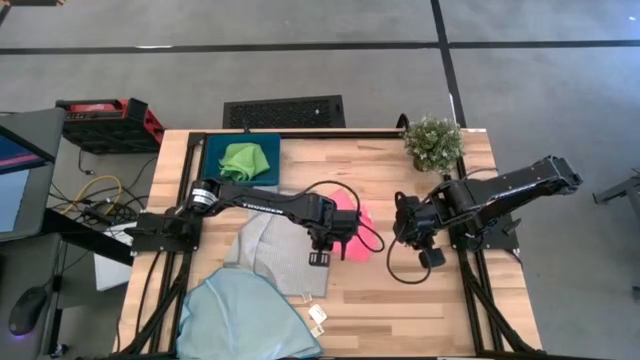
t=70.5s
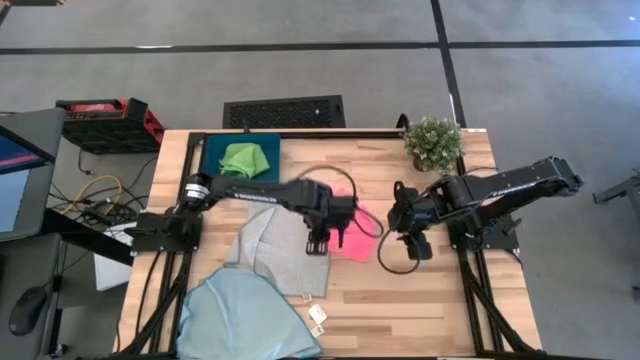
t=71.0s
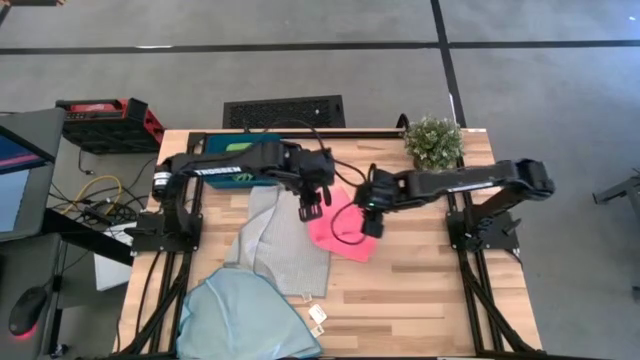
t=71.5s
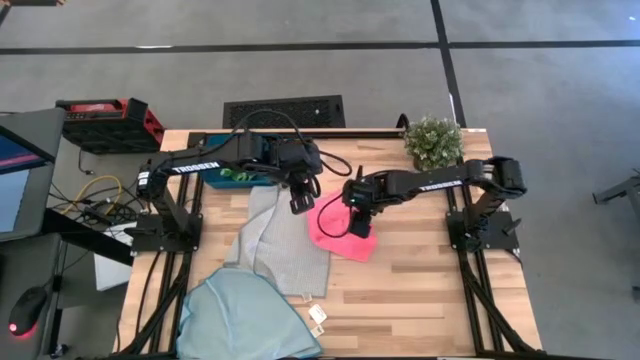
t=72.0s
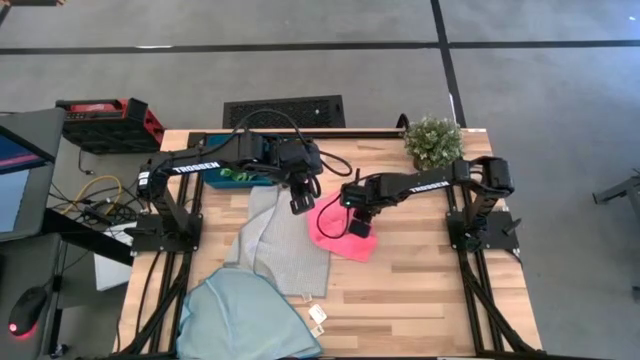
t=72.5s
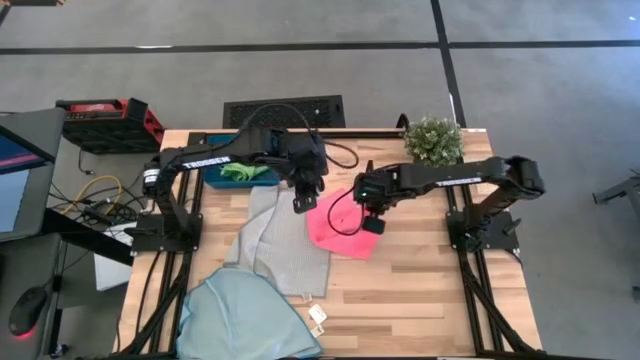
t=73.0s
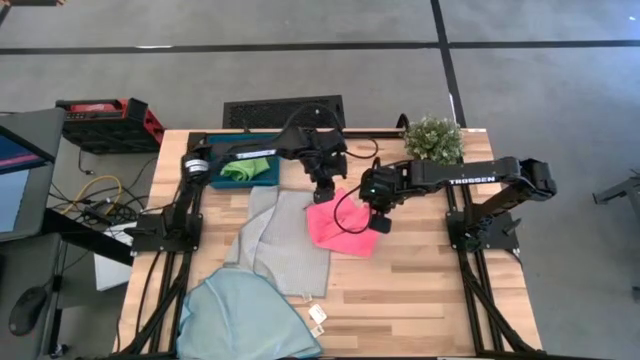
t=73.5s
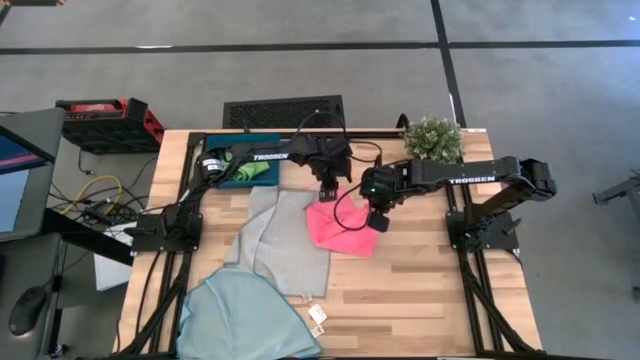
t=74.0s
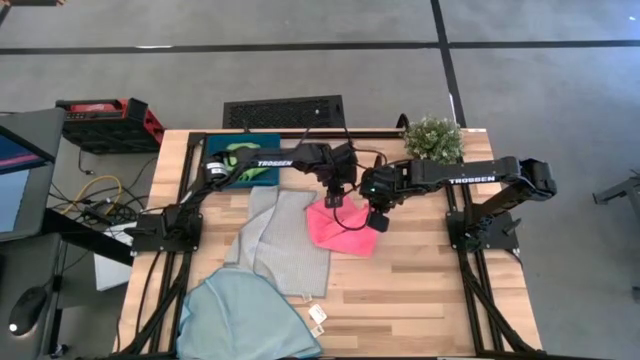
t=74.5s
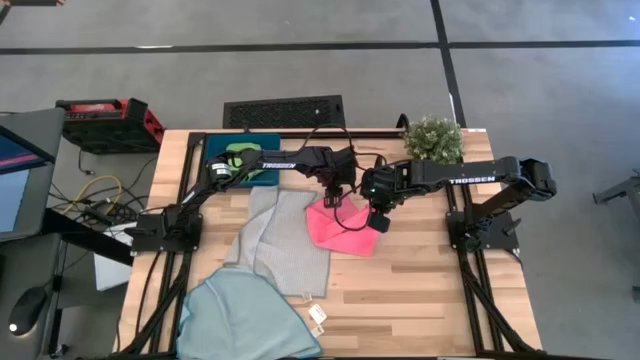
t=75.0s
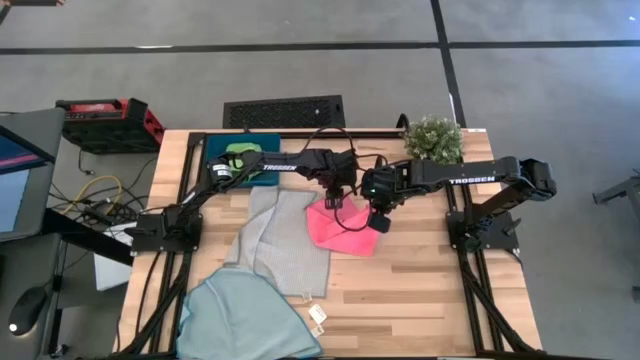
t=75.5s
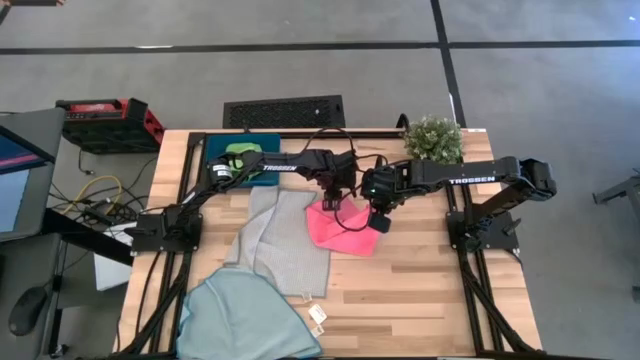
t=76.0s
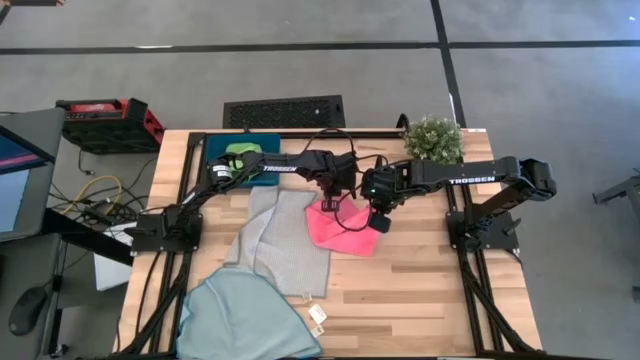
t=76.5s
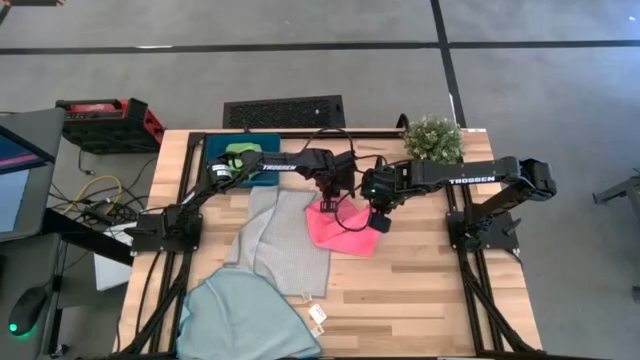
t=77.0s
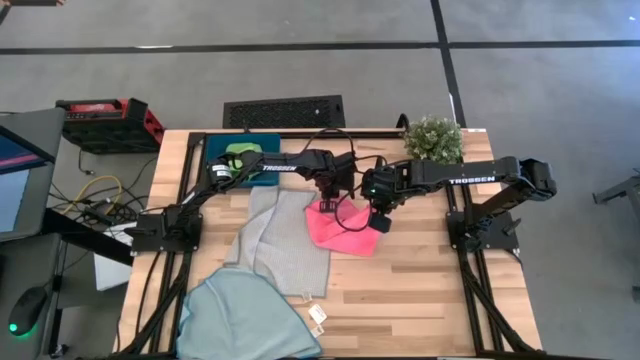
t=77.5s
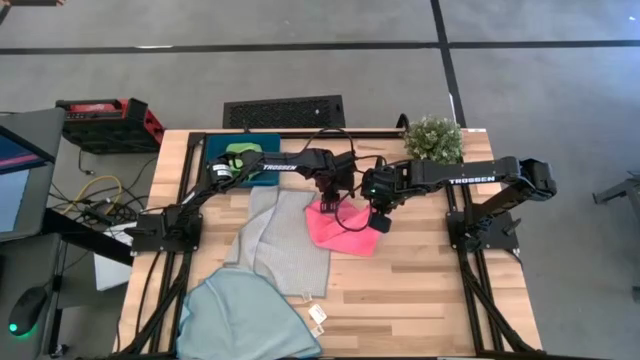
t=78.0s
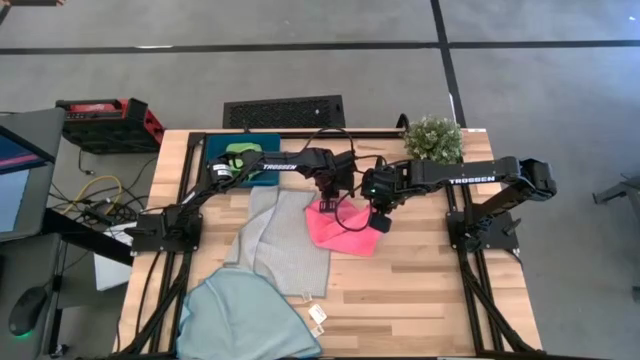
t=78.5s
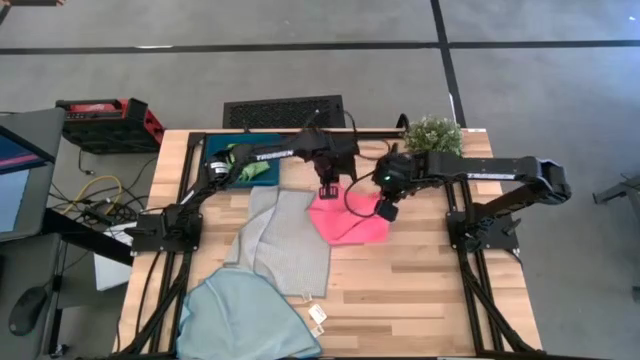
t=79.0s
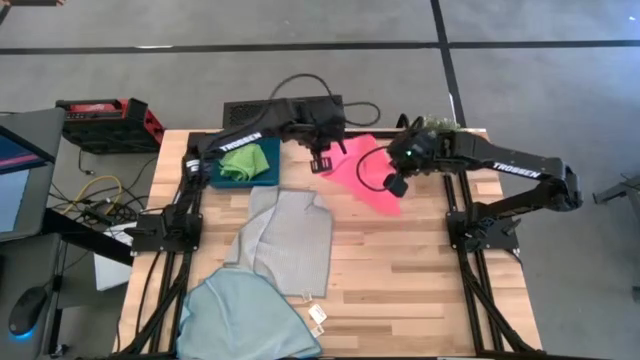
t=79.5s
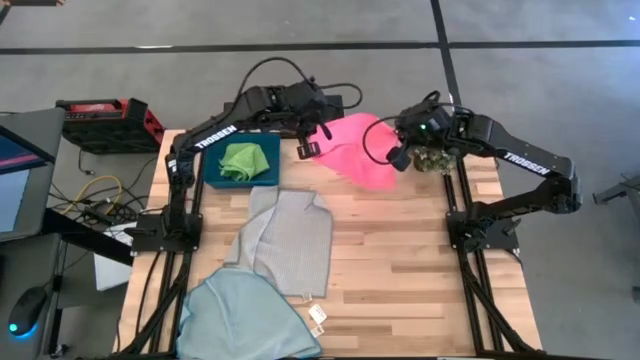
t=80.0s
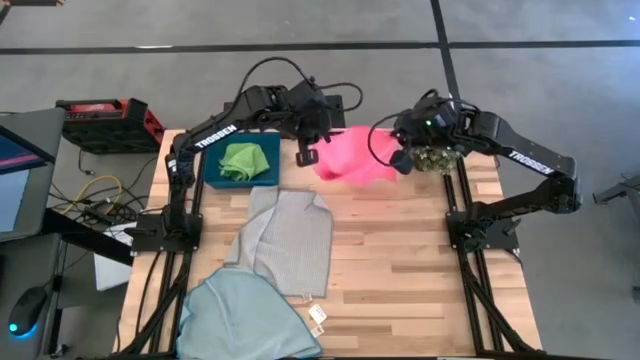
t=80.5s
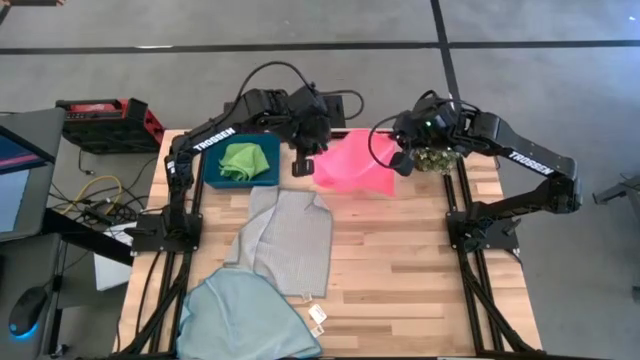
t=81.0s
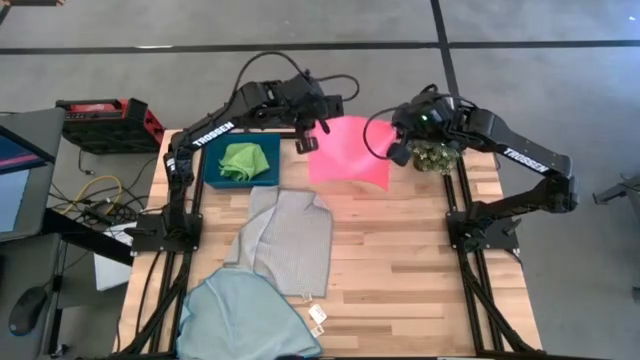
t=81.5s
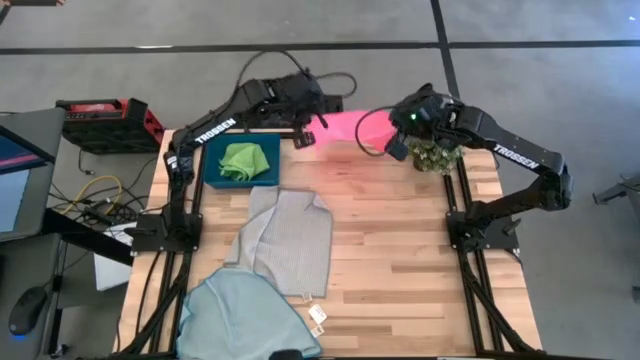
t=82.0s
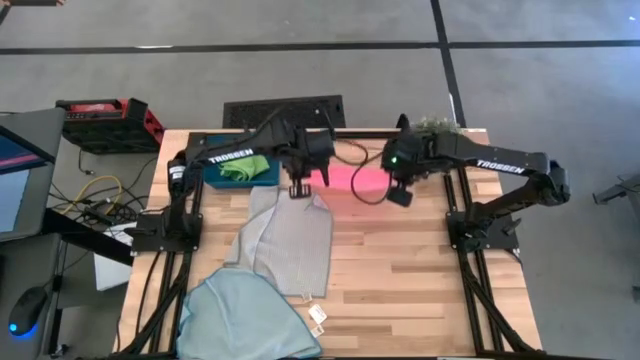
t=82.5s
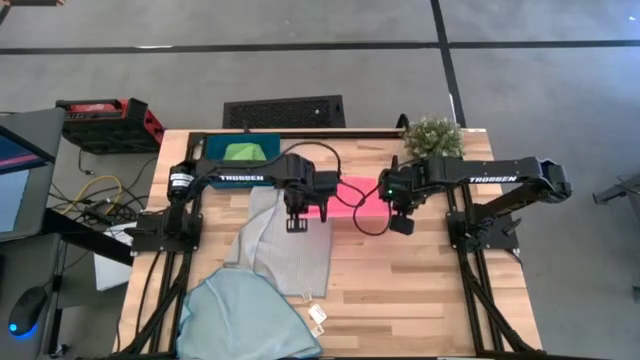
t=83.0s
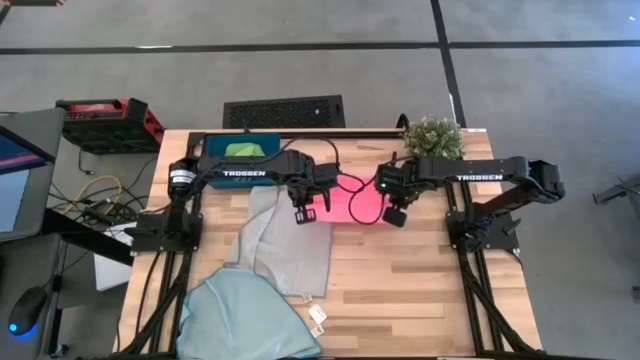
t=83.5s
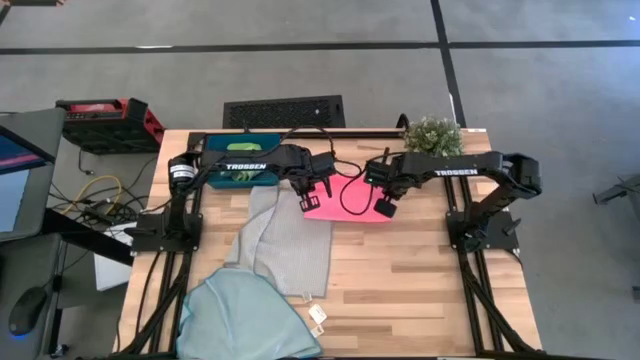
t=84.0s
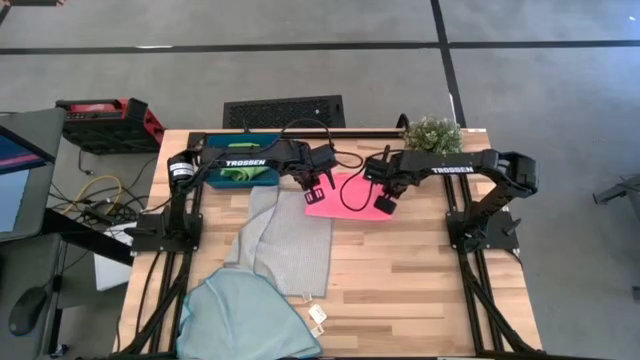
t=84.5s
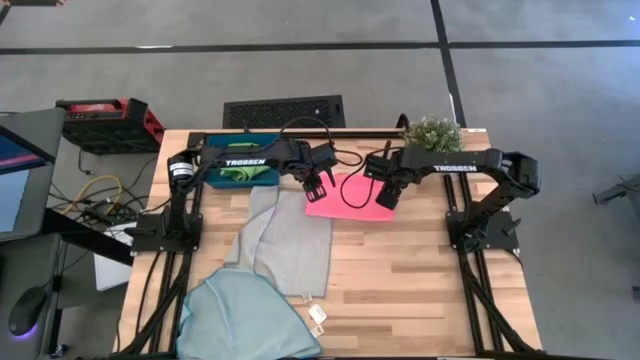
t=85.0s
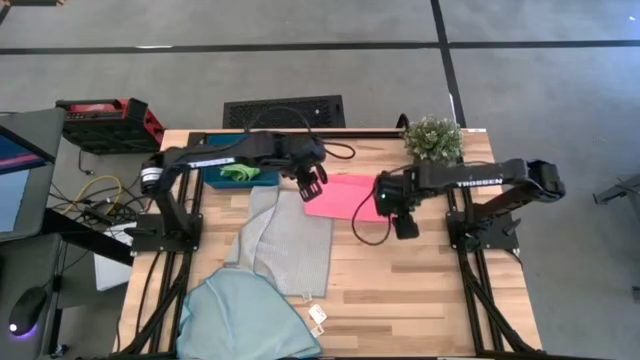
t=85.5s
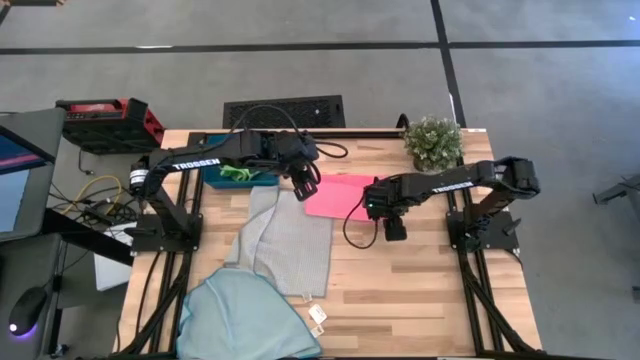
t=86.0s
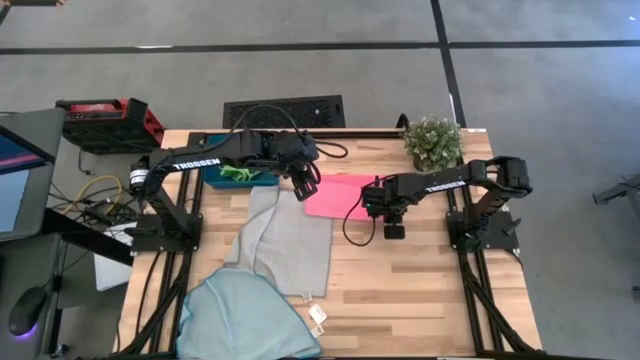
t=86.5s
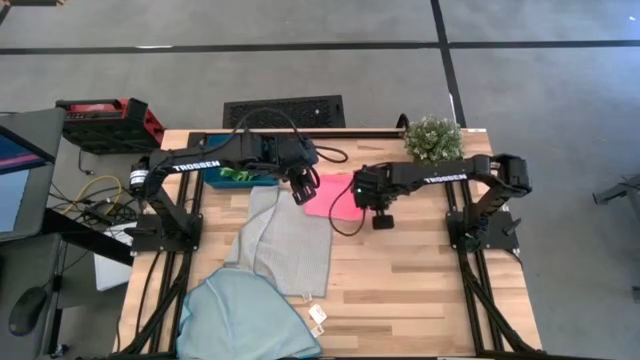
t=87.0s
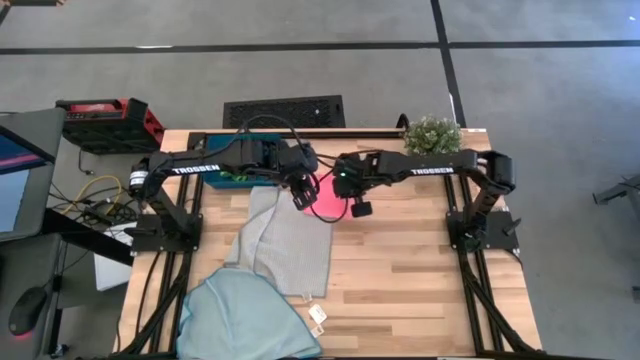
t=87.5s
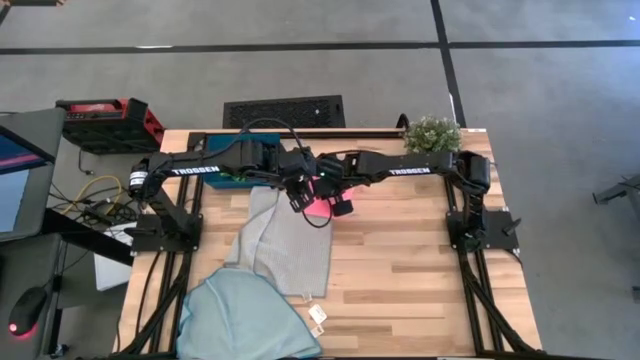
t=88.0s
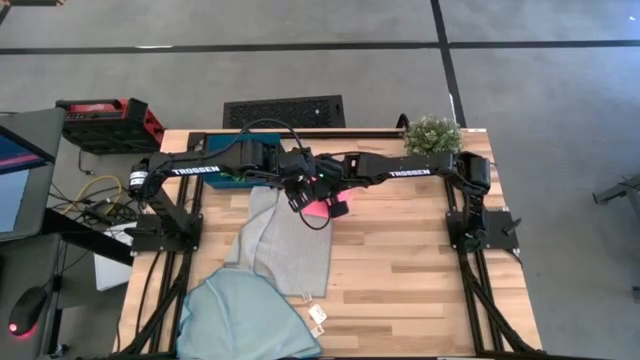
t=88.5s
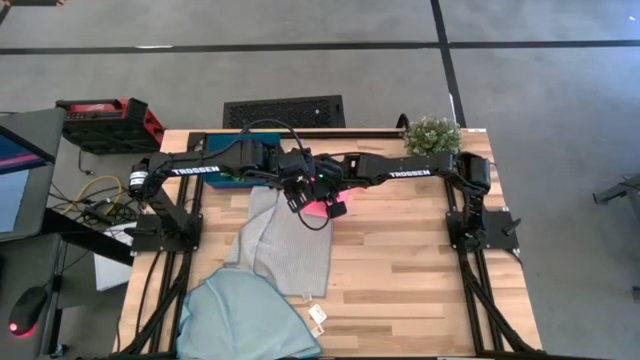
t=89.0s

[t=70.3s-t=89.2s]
Task: Fold microfiber towels
Fold the pink cloth

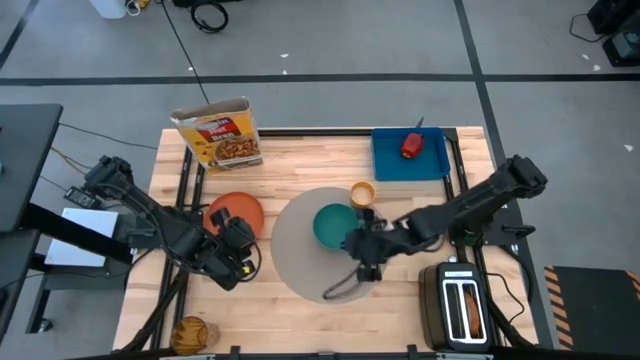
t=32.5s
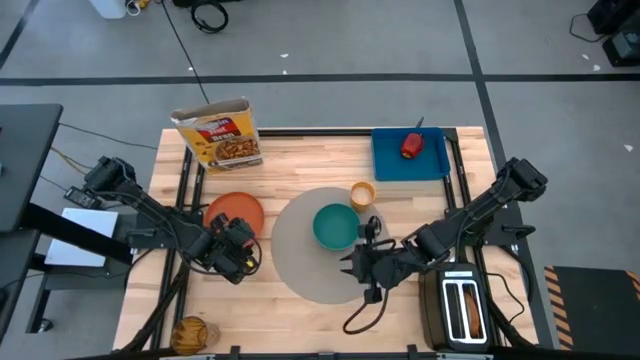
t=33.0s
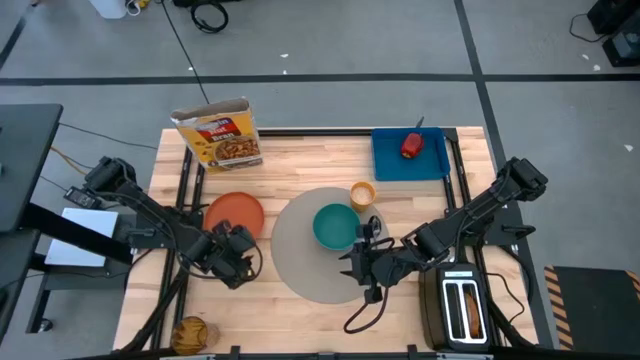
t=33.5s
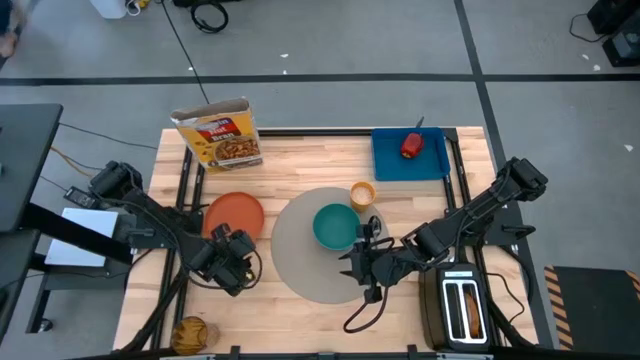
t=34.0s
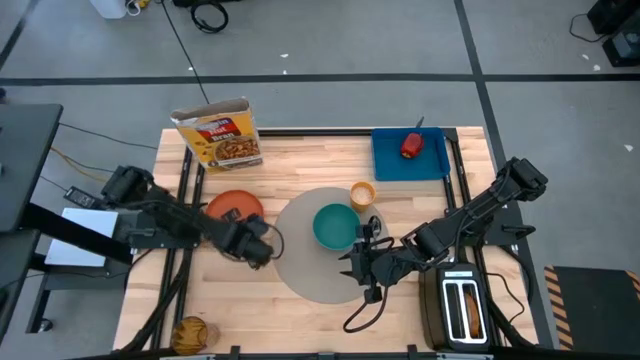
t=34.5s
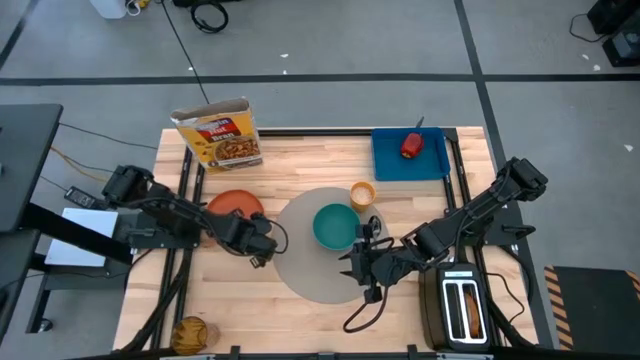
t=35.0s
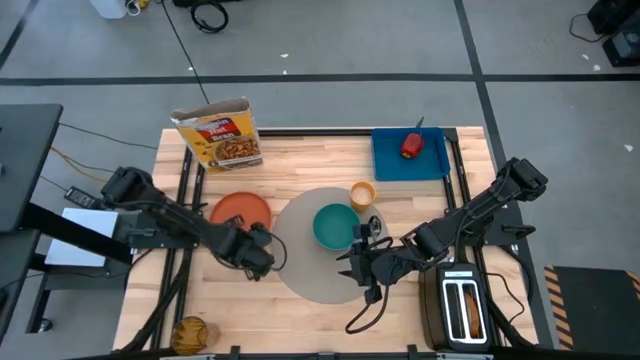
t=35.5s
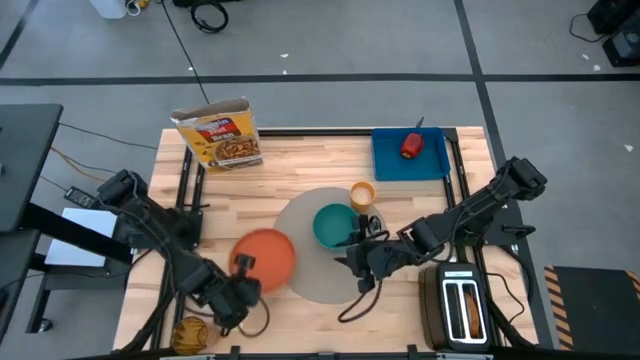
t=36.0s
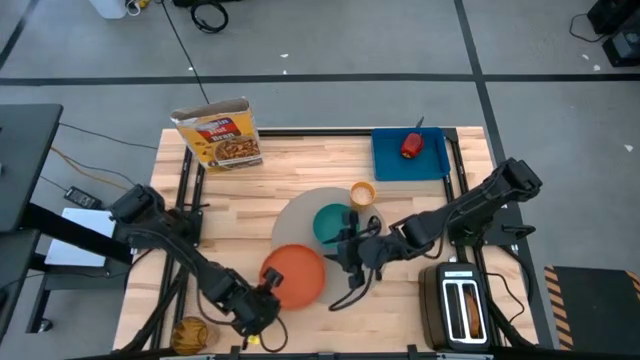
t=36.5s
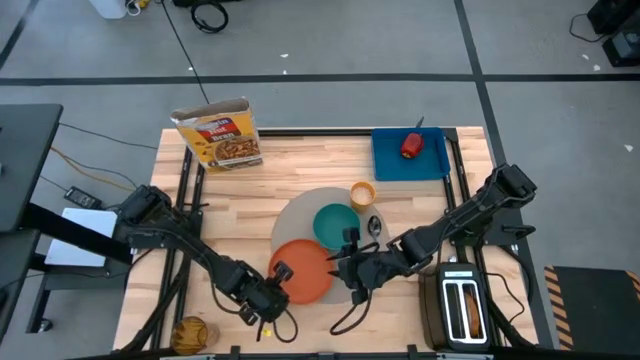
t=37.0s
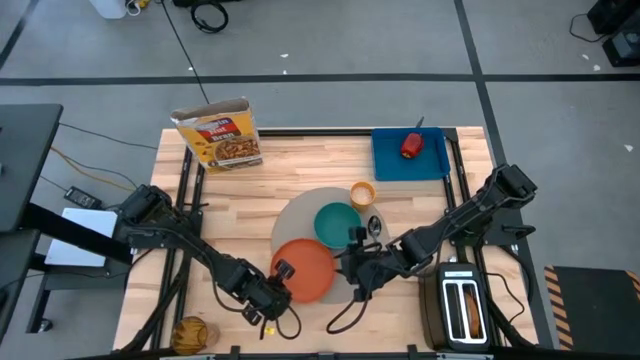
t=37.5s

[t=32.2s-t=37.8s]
Task: Arrange a breakfast setting
Put the plate on the mat to the bottom left of the bowl
